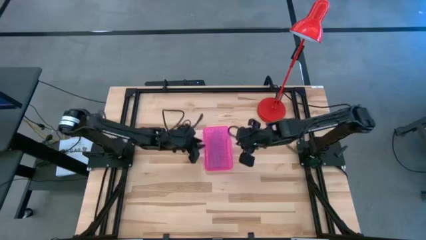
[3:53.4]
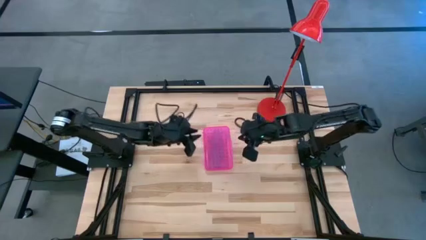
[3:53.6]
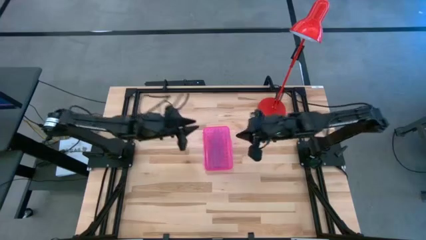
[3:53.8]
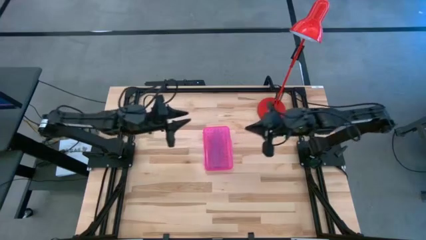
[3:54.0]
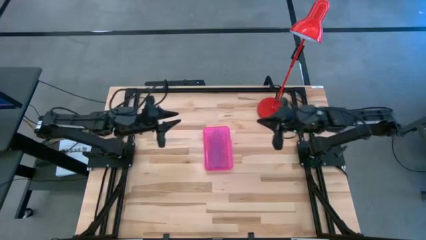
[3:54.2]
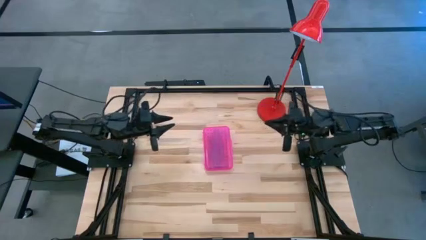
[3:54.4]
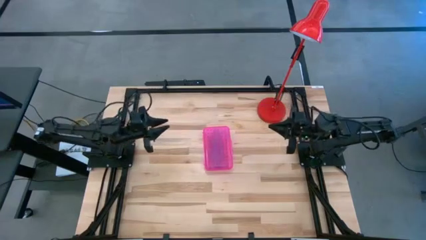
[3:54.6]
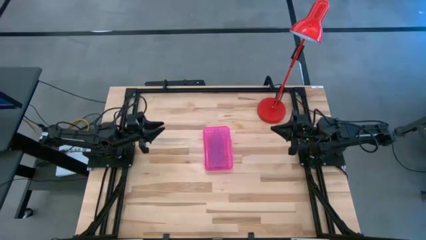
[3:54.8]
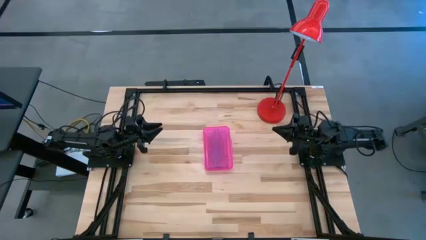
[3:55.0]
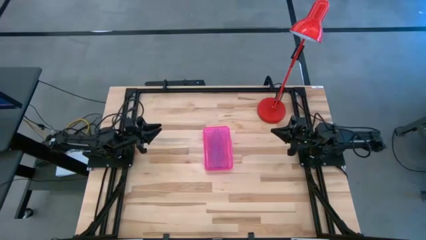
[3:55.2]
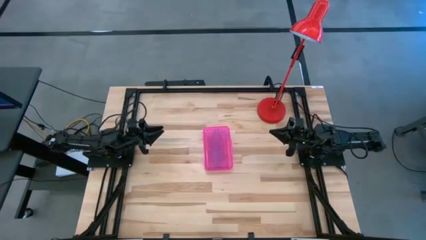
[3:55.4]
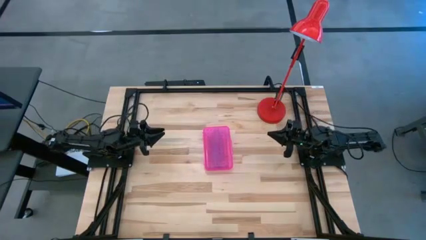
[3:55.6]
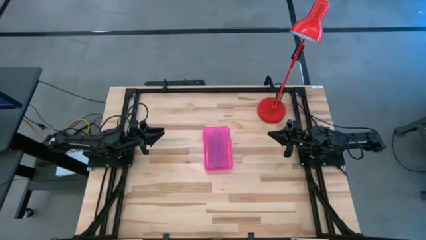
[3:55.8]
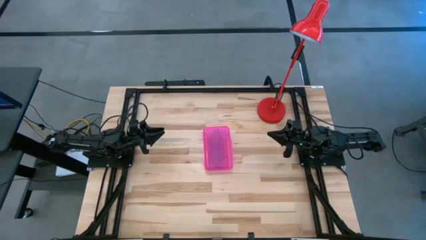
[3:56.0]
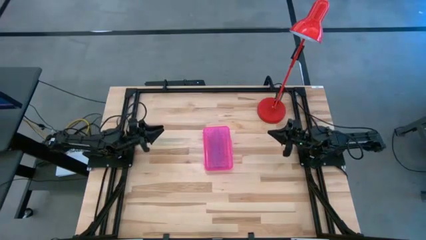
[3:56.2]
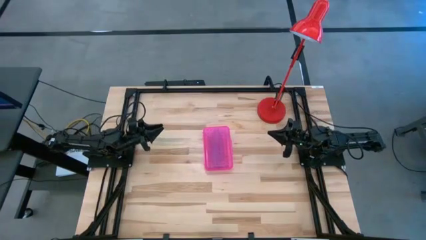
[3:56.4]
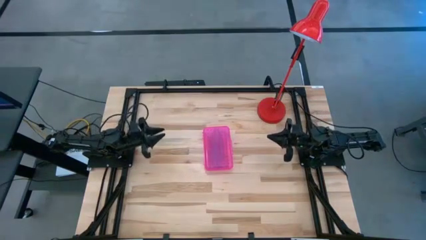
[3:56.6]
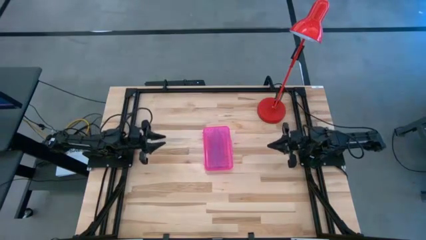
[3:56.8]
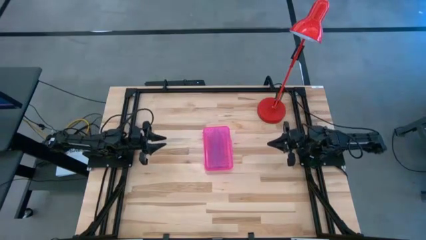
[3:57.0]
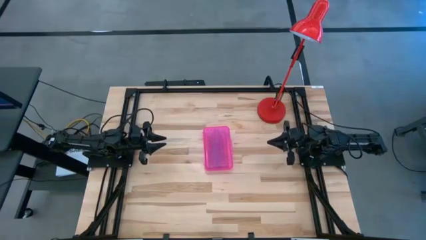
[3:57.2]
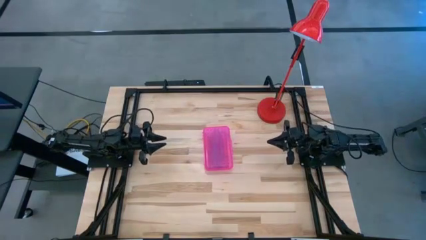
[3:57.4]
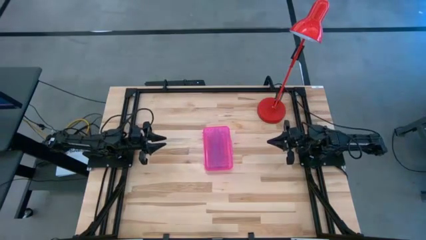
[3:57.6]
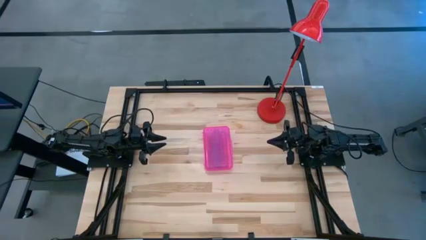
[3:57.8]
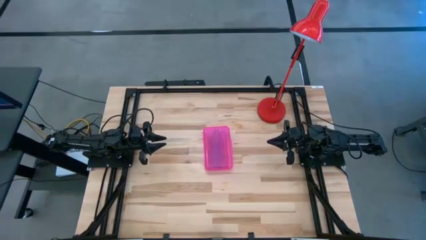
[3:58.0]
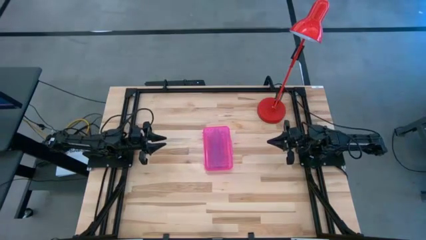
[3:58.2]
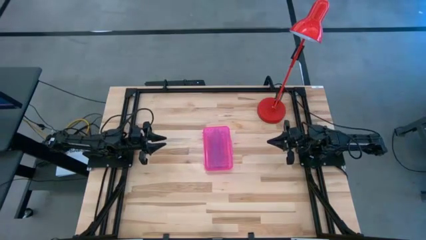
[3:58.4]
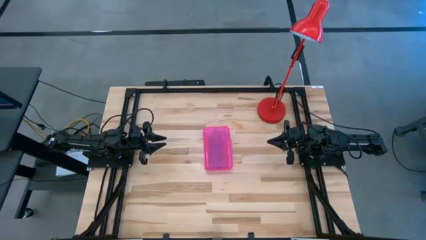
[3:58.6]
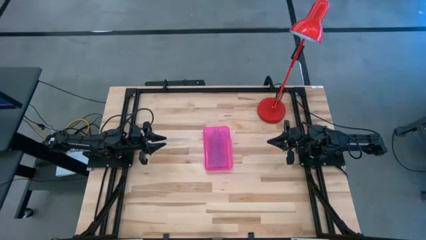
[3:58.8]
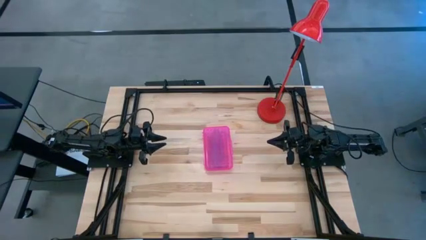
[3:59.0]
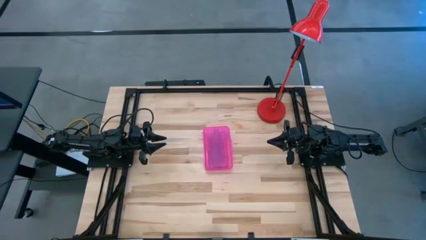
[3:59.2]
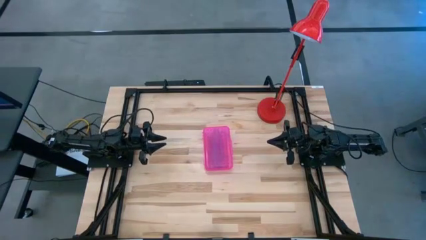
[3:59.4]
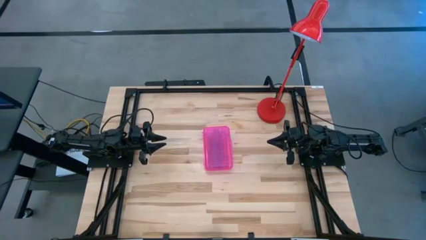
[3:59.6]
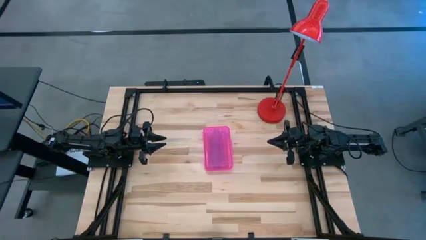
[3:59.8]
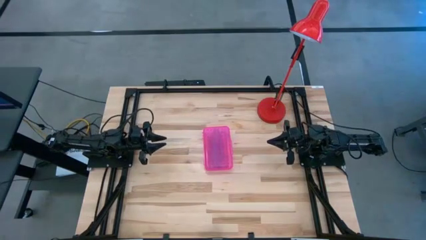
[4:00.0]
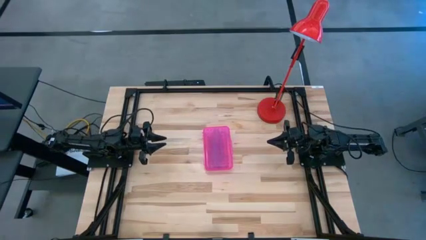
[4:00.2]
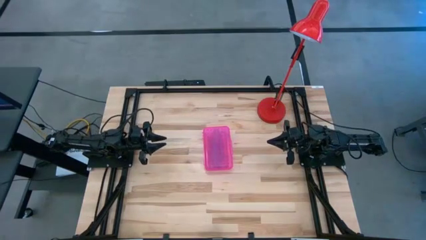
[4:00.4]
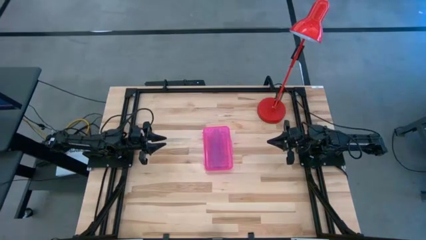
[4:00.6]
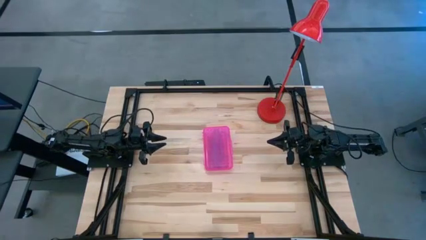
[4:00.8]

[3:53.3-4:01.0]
Task: Pick & place school supplies into a supply box
Return to Home Position

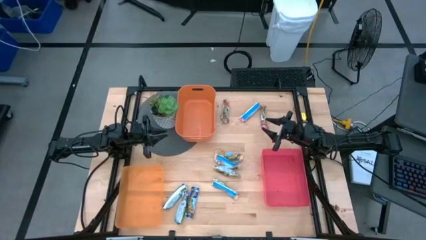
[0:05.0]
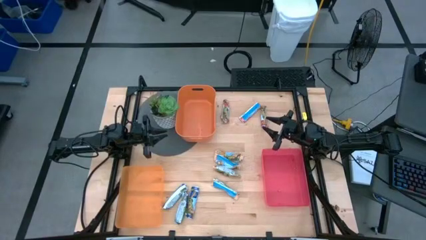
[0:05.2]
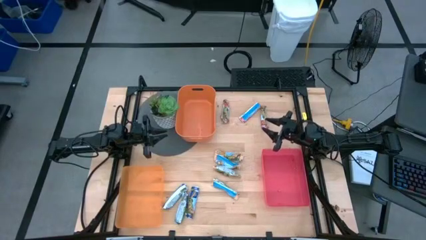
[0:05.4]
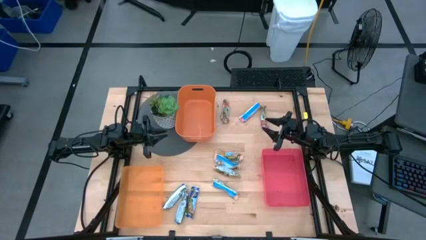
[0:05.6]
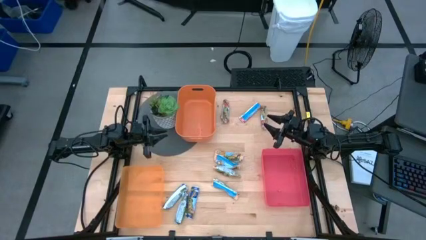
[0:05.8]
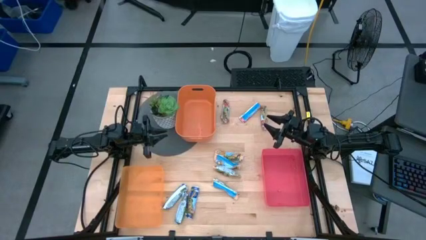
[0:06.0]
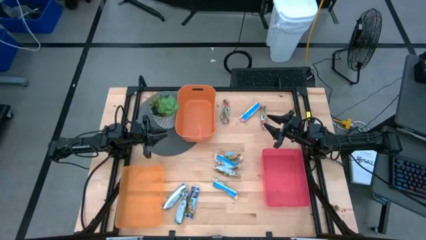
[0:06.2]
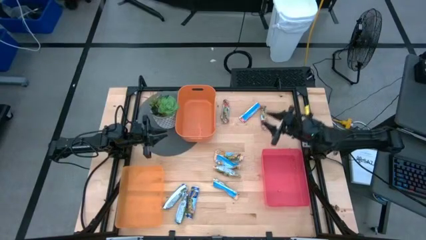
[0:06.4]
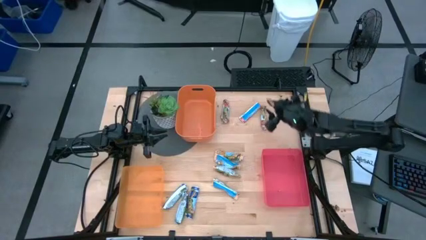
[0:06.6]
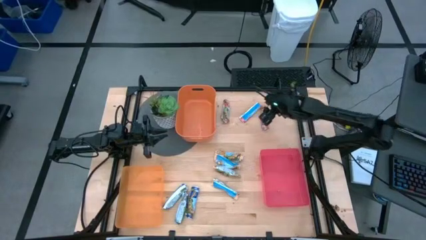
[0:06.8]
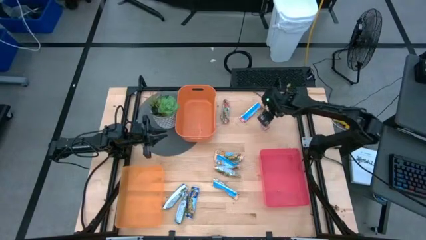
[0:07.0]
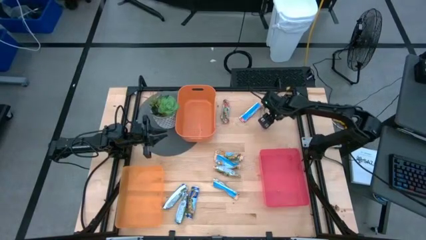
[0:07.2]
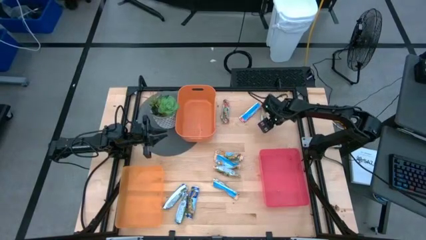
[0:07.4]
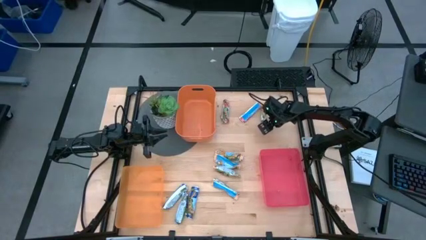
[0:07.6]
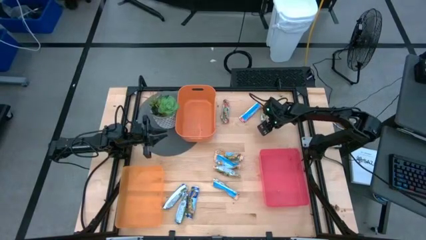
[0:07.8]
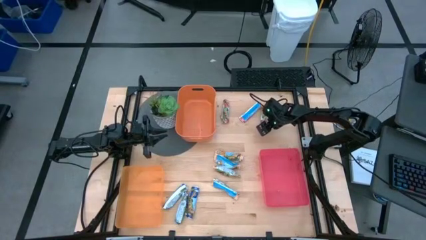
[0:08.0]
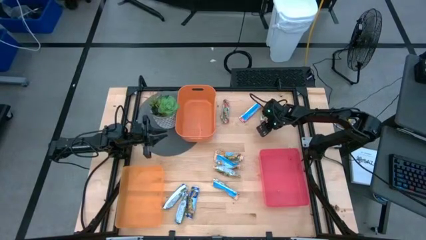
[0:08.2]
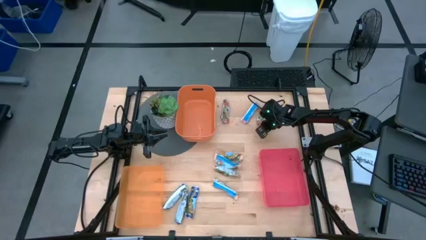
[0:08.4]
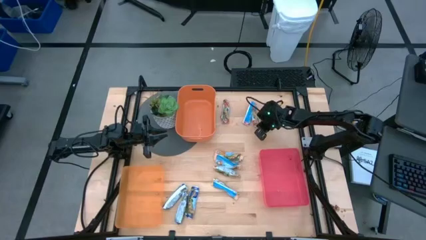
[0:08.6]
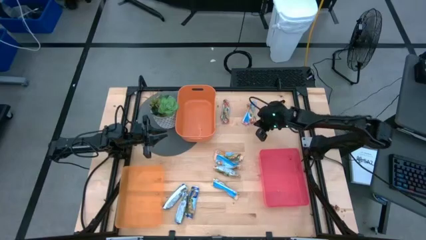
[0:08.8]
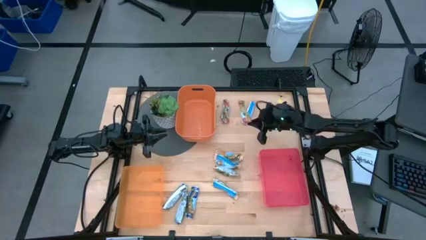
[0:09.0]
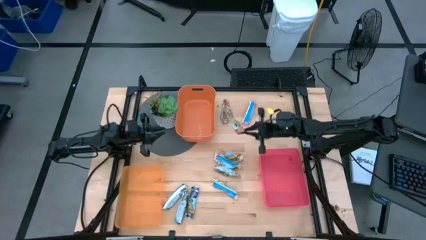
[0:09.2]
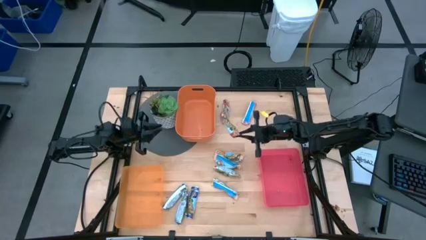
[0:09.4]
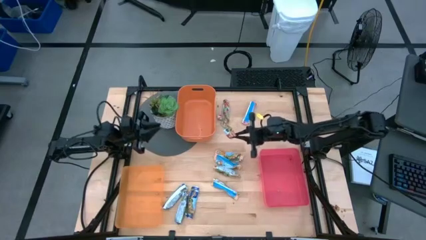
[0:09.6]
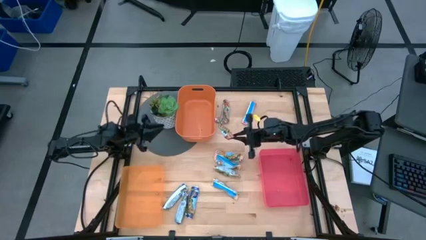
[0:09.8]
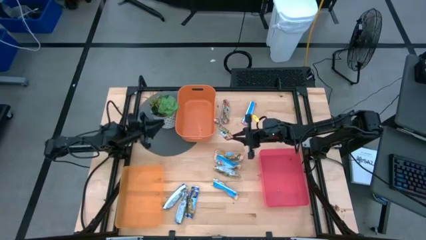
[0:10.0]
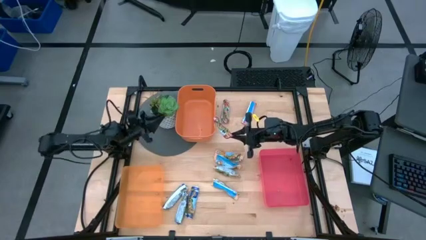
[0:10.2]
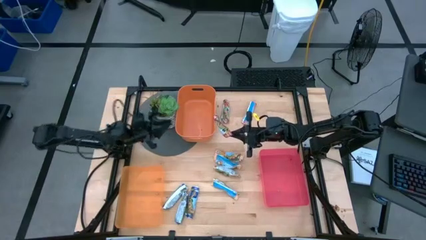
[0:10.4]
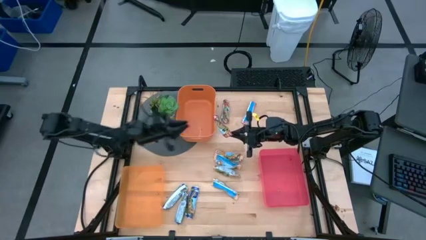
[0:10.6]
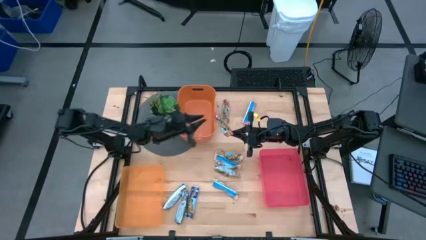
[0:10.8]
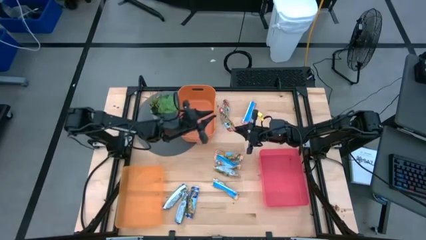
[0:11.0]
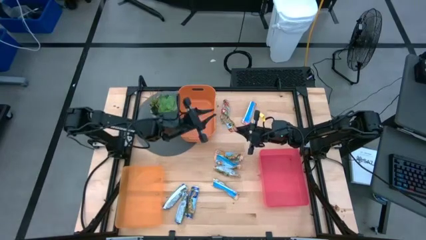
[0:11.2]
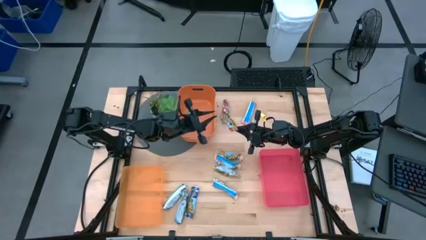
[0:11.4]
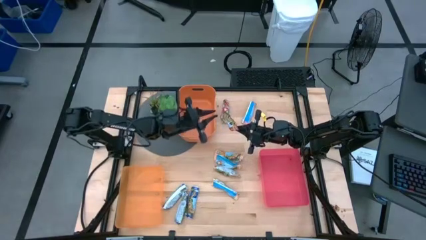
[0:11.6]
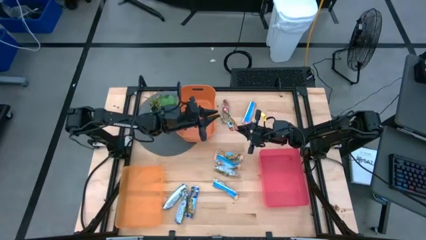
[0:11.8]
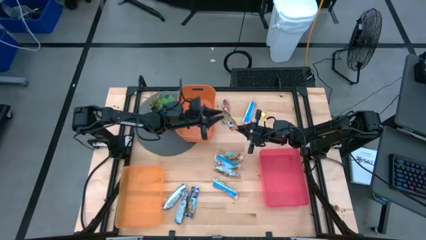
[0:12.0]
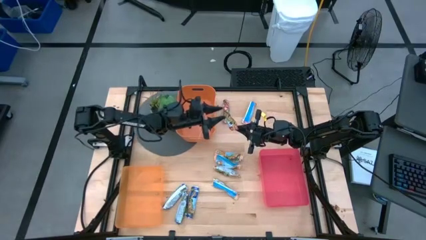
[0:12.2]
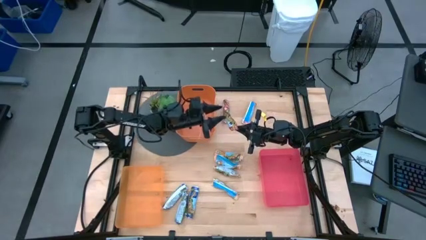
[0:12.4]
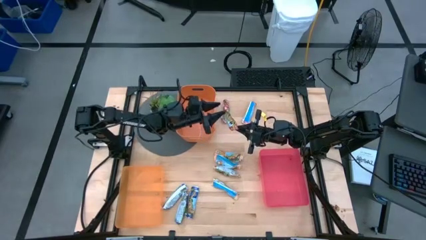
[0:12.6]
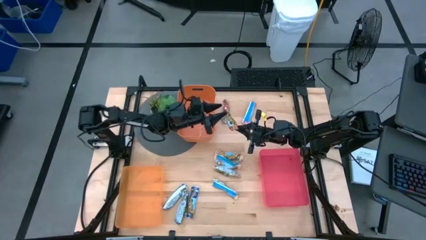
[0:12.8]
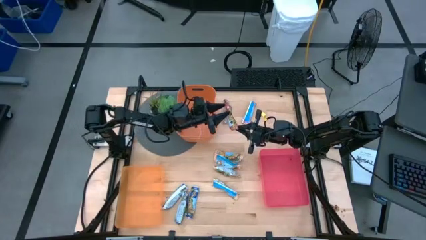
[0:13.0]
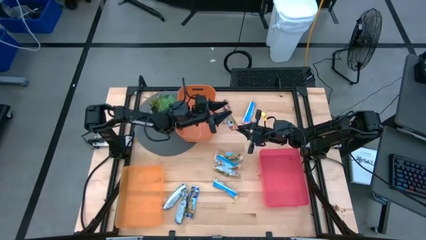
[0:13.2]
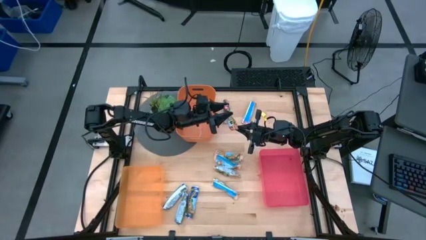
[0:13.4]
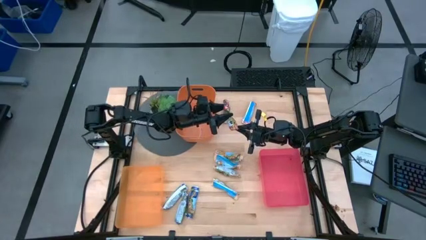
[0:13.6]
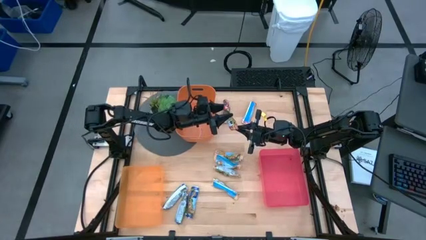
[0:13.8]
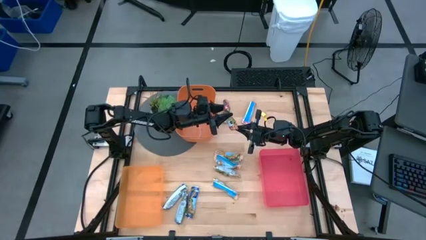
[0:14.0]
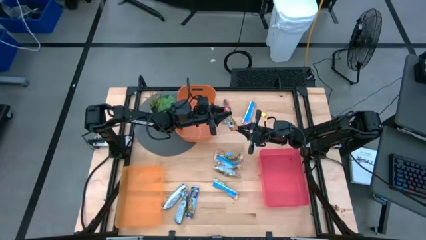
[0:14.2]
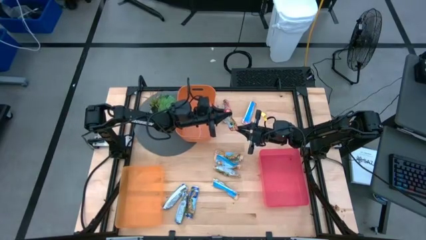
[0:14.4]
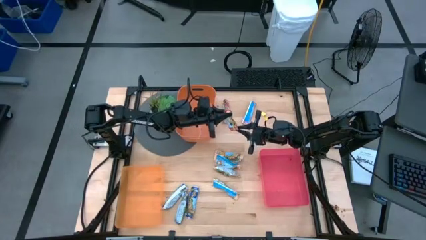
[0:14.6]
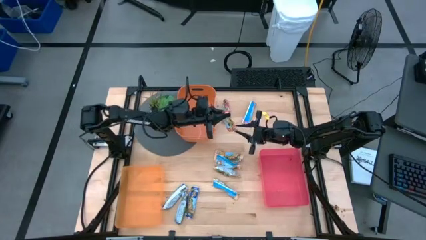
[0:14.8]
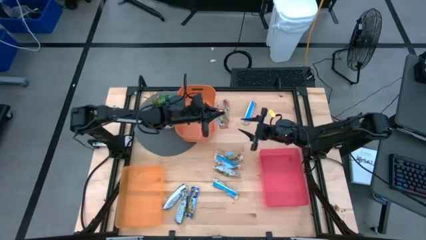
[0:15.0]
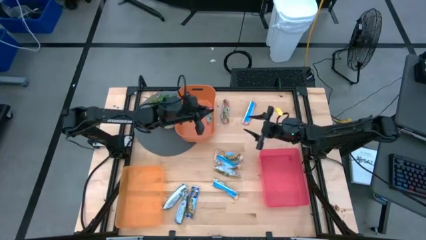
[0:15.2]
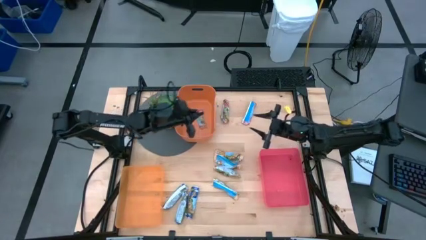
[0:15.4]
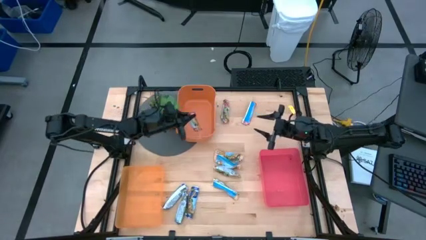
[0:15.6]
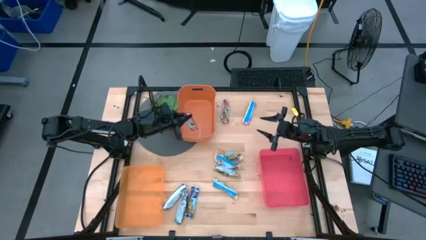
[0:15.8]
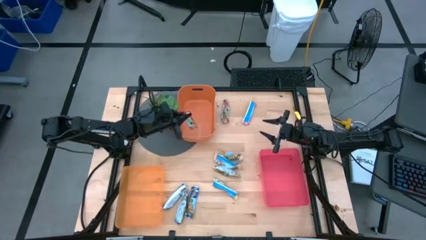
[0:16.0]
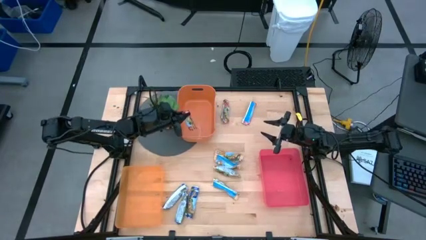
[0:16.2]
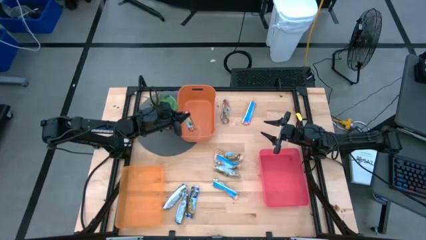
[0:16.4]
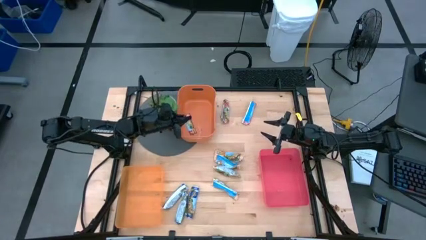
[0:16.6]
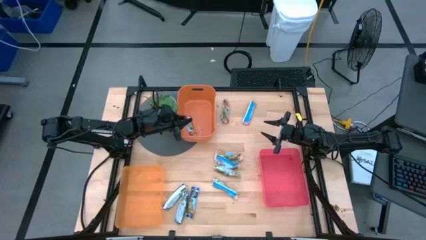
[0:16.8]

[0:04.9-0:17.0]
Task: Pick and place Granola Bars by type
Put the red granola bar into the orange bin
